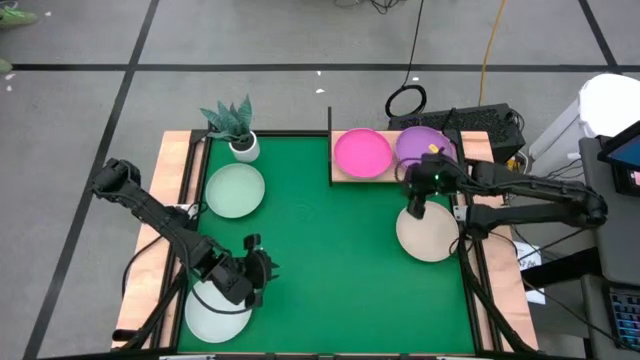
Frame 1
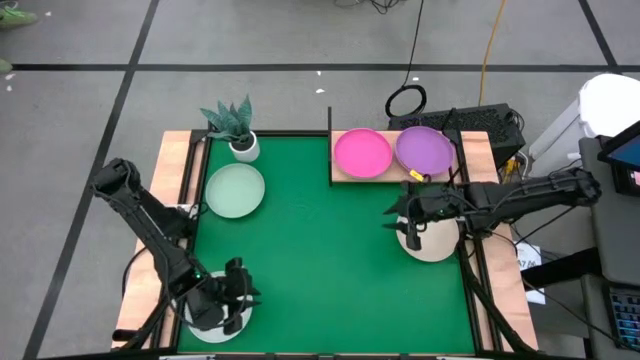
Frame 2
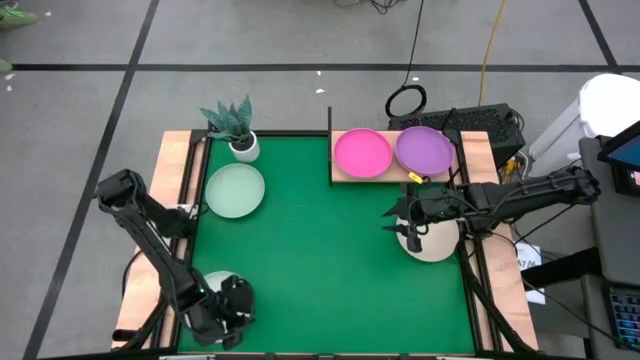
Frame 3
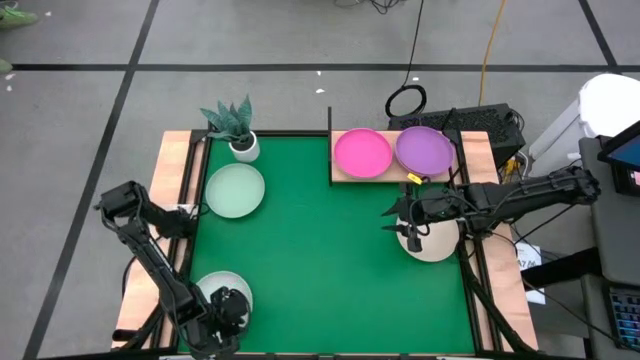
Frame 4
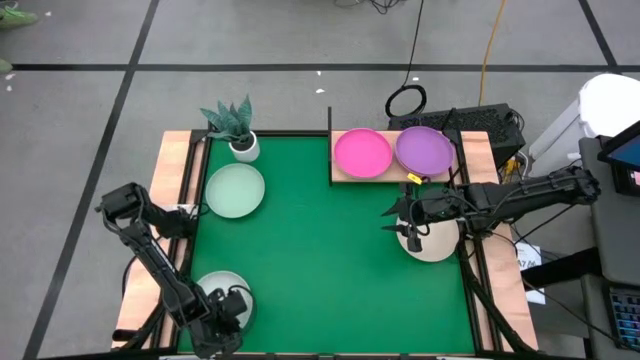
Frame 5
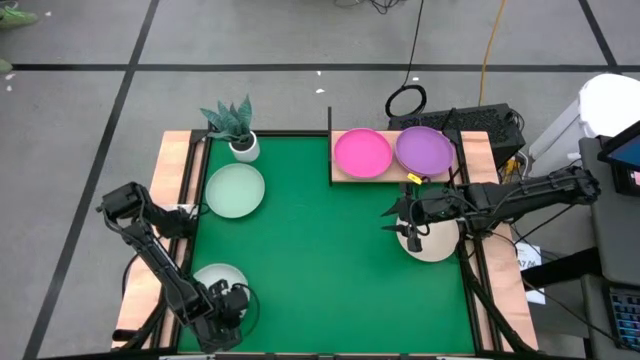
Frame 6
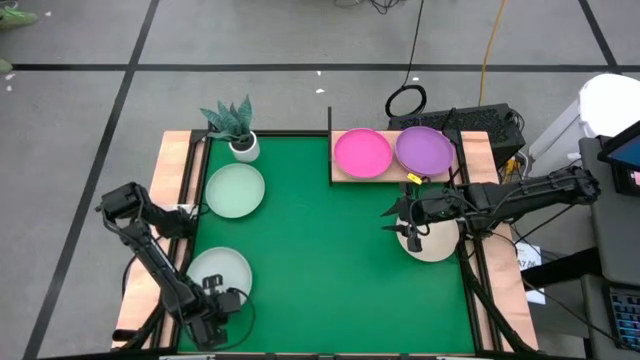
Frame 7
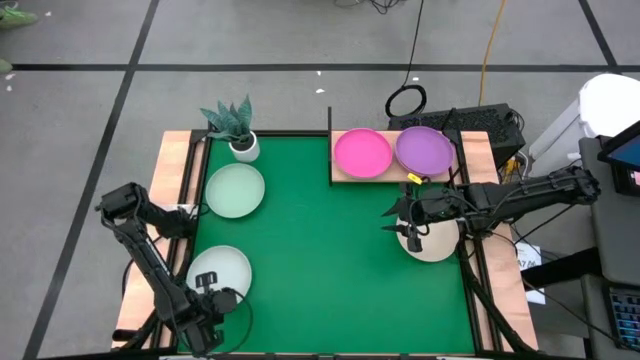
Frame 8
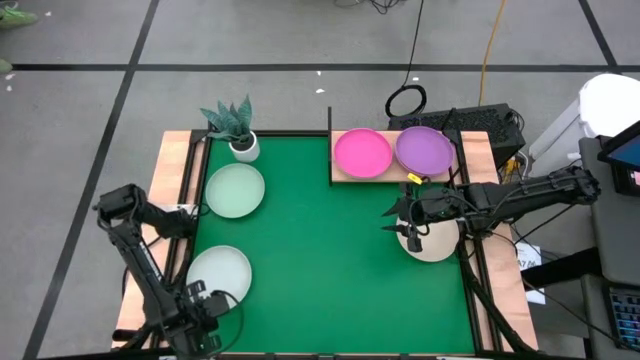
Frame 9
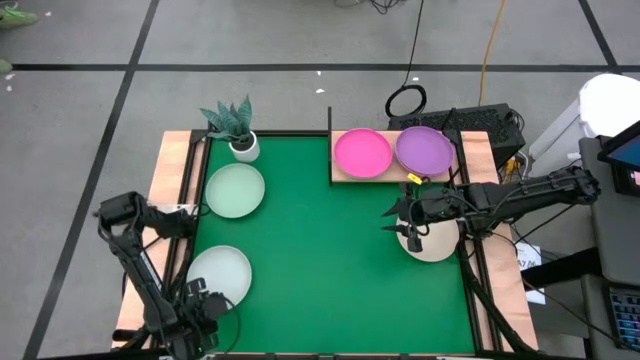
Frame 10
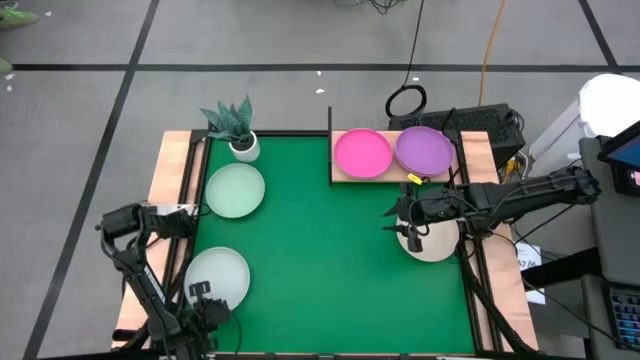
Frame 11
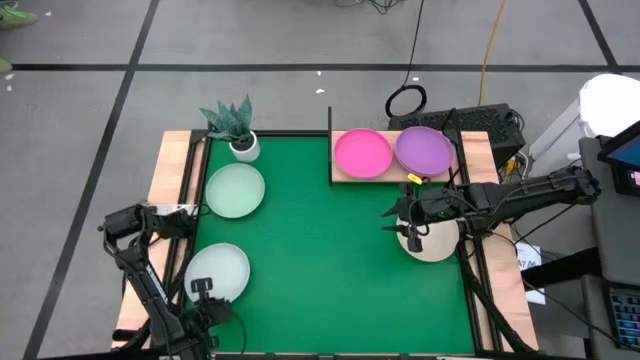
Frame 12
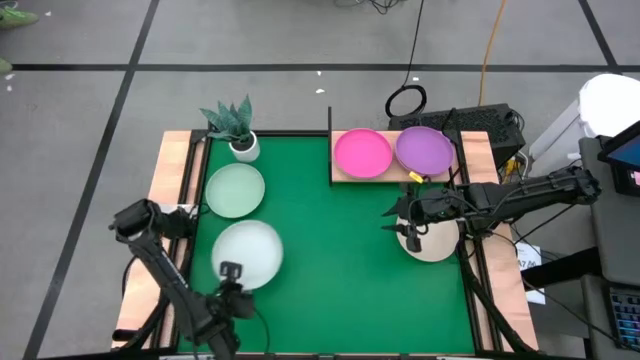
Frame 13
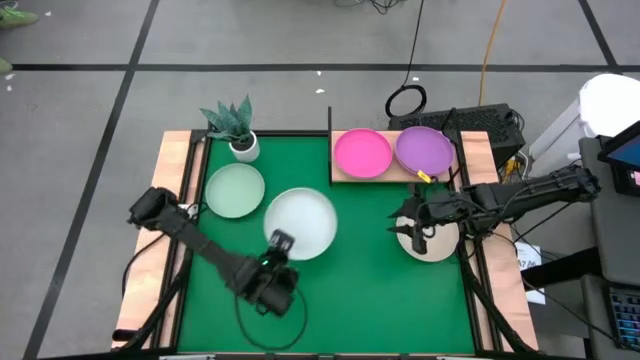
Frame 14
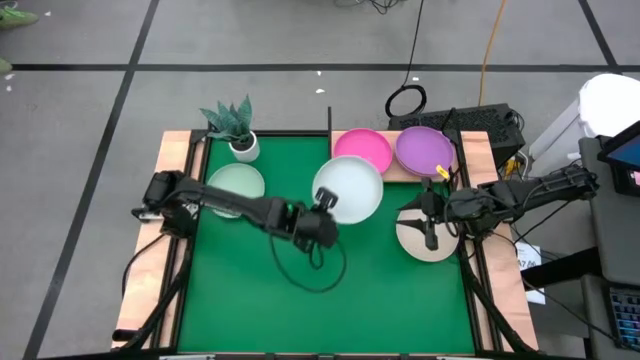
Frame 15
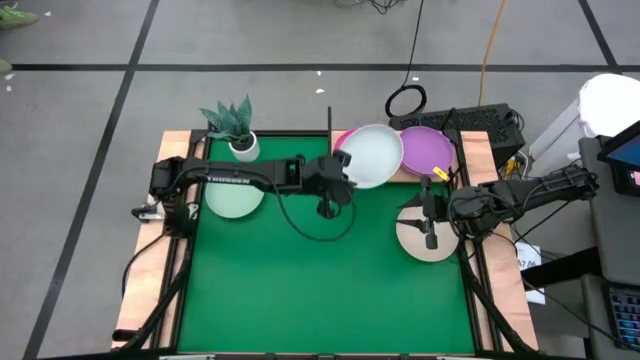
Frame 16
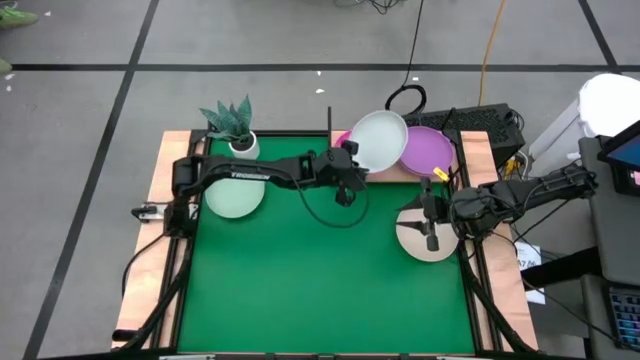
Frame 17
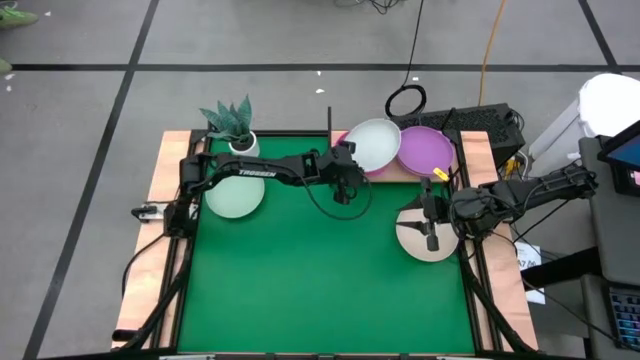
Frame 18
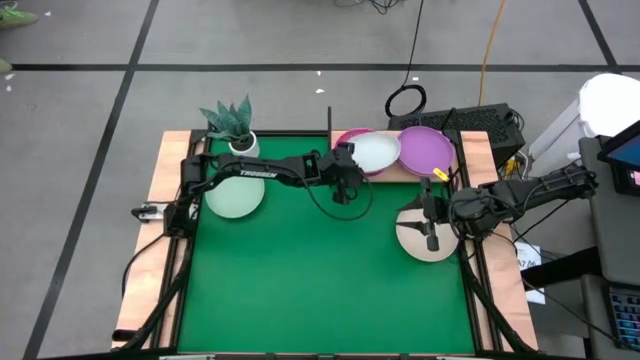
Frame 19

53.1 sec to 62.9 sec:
Task: Place and stack plates onto a shelf
Stack the gray plate on top of the pink plate on the shelf

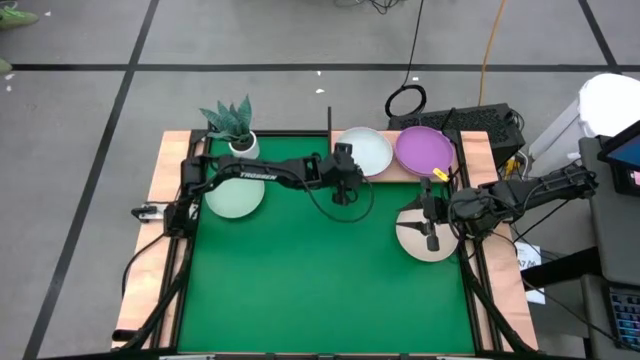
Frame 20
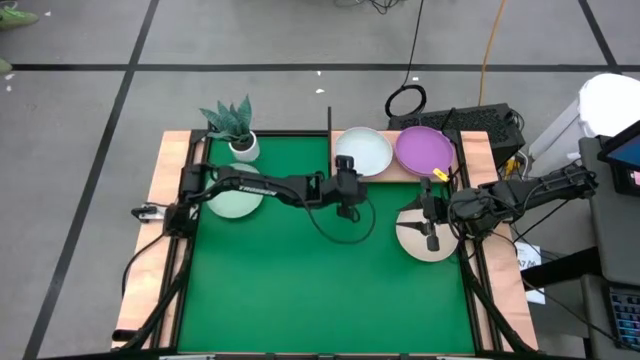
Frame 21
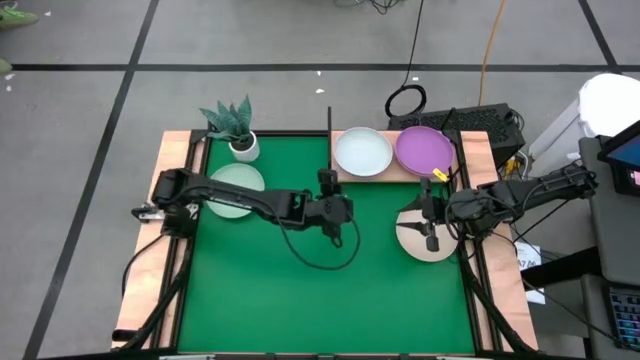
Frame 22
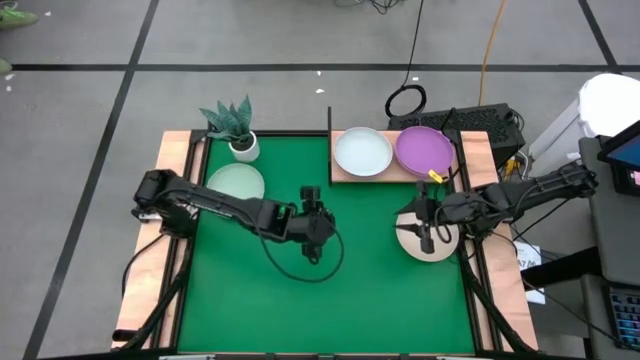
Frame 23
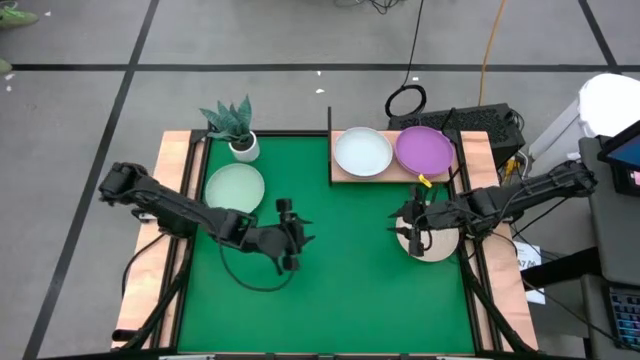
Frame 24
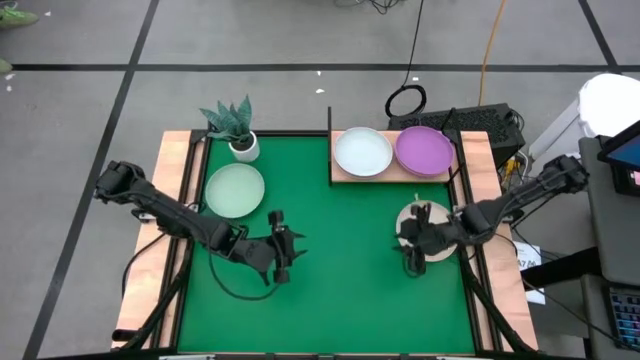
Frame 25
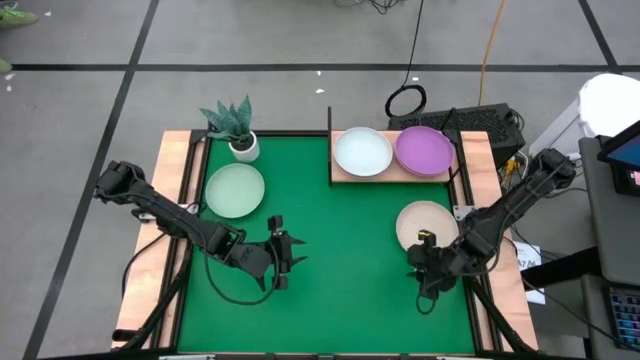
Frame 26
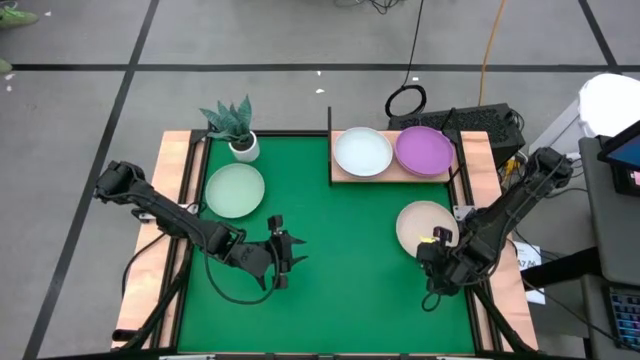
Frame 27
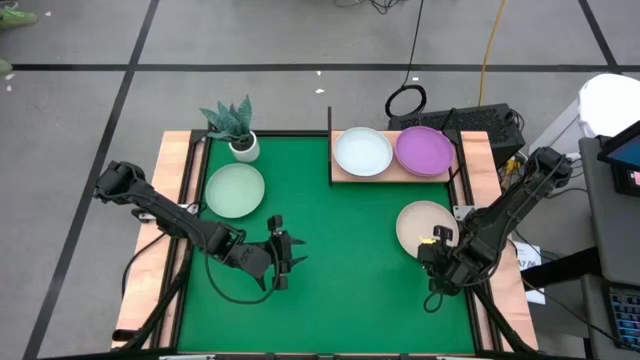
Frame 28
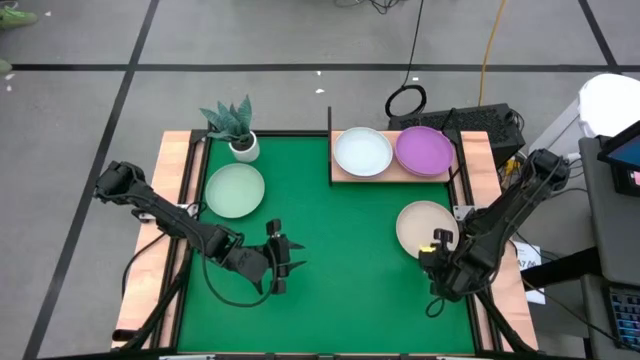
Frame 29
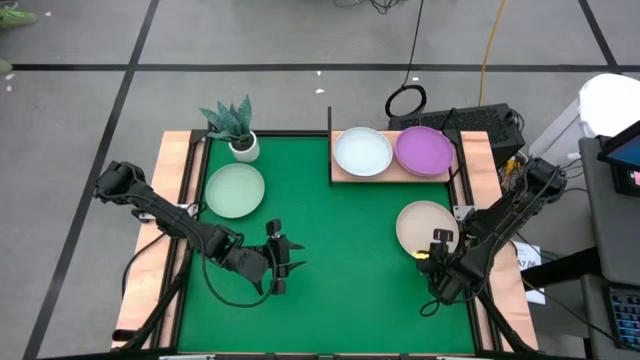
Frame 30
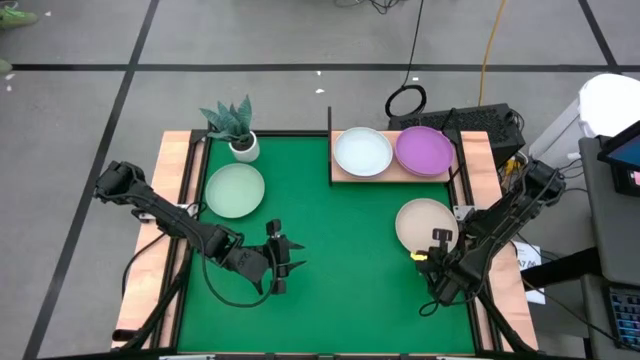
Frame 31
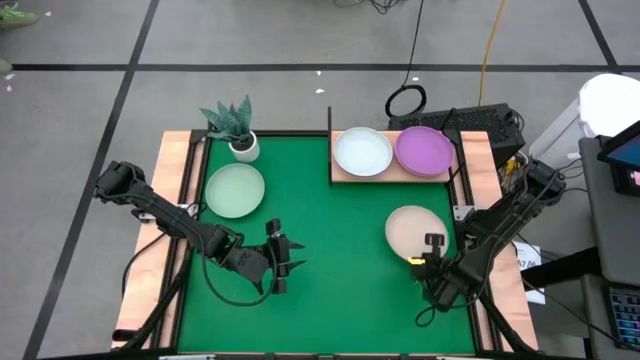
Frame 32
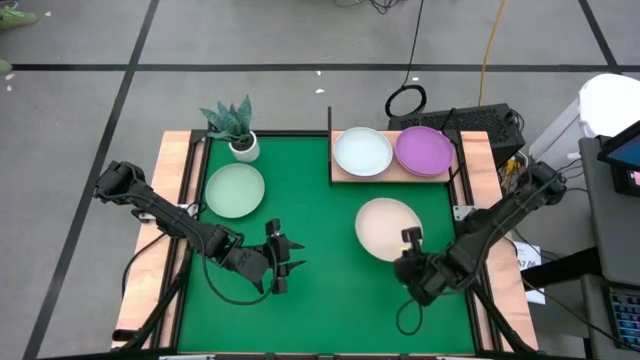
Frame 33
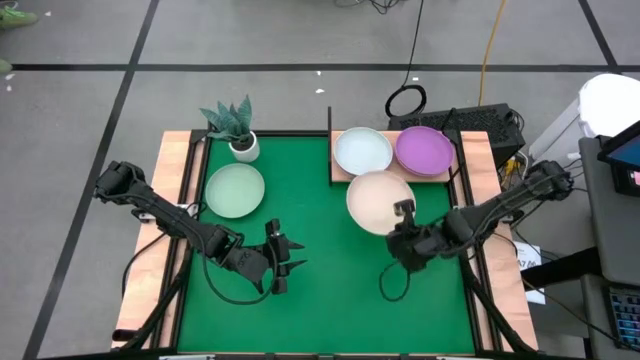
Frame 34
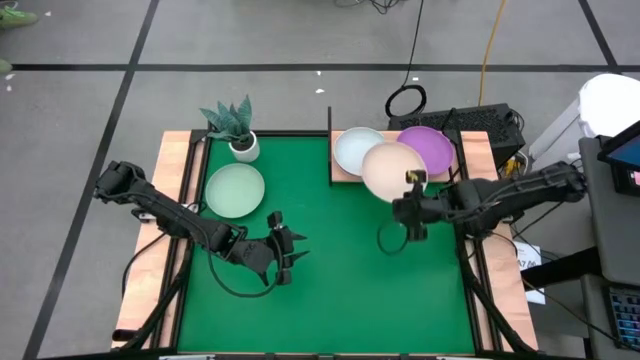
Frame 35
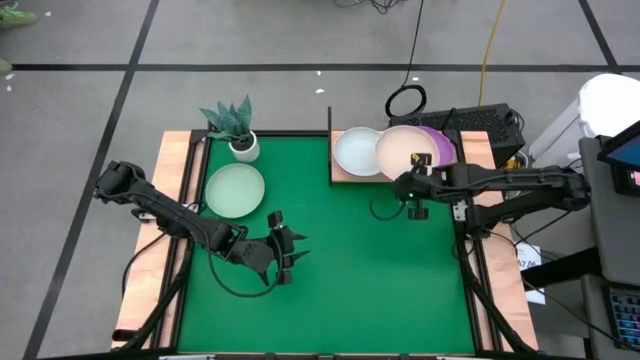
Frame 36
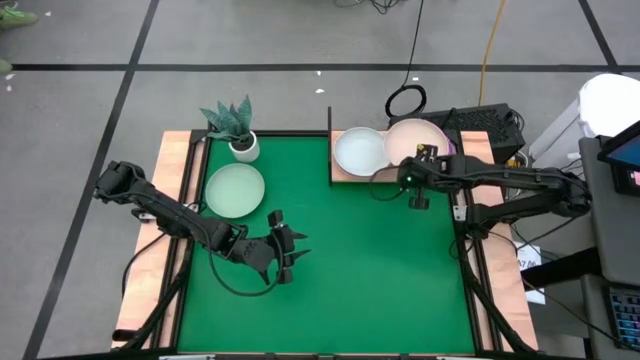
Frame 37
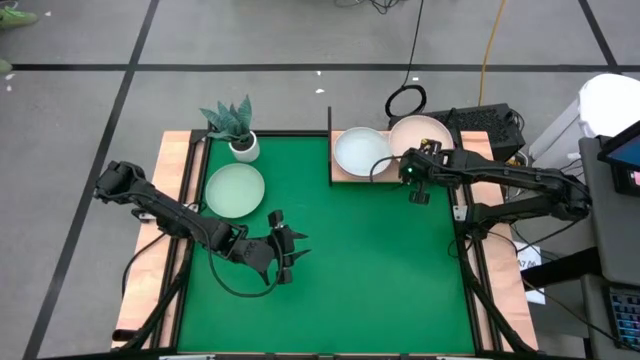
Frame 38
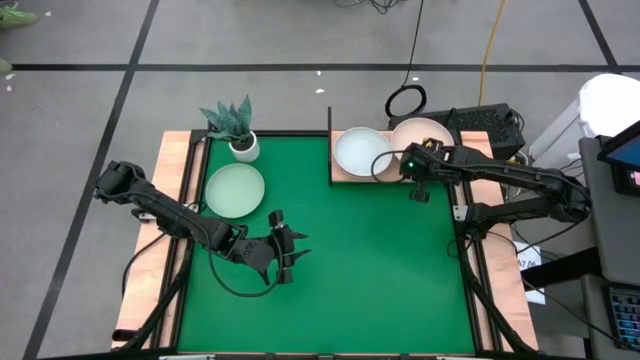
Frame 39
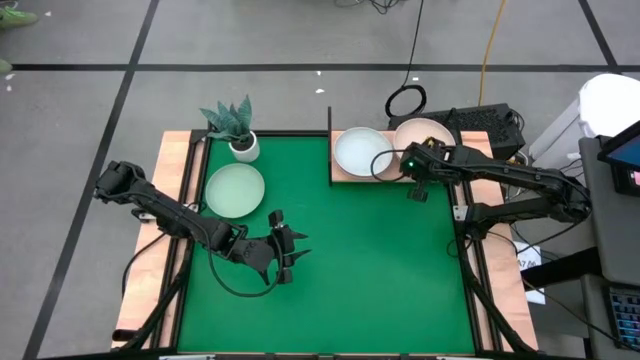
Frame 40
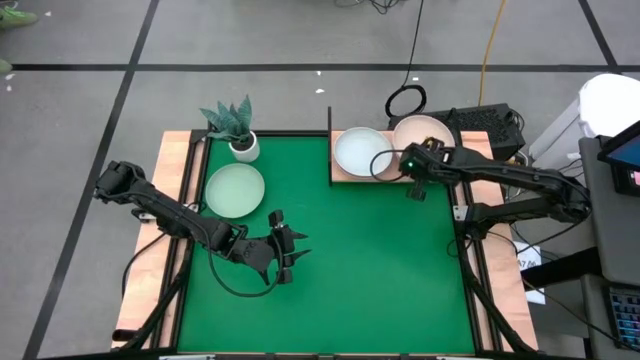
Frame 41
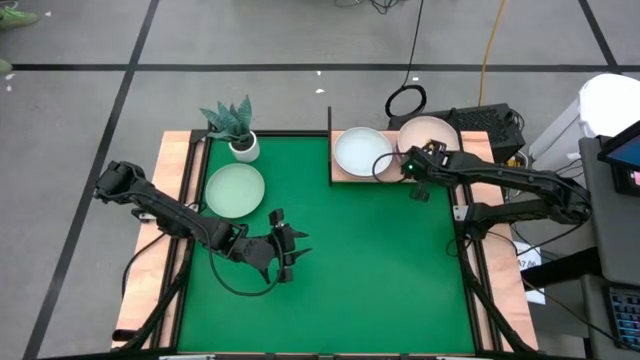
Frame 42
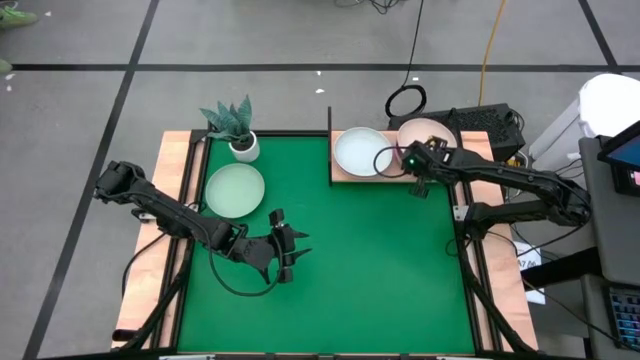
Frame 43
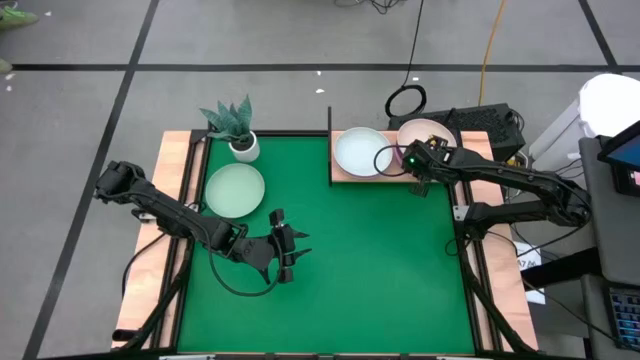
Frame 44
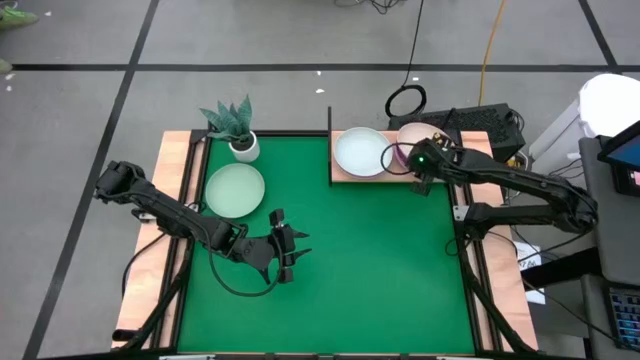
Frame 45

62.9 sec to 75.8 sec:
Stack the brown plate on top of the purple plate on the shelf
